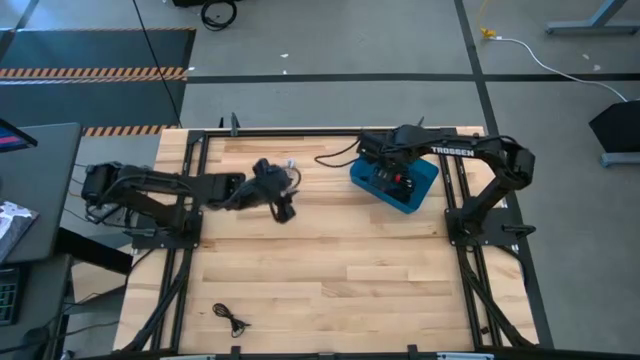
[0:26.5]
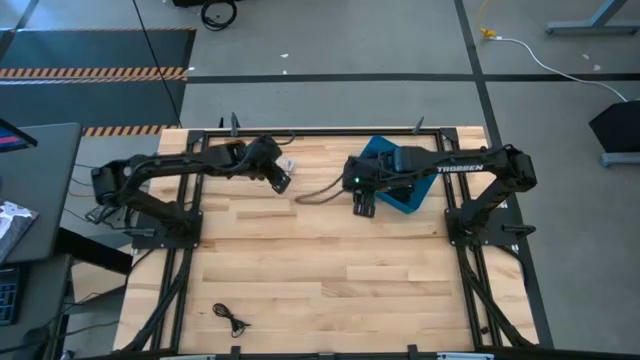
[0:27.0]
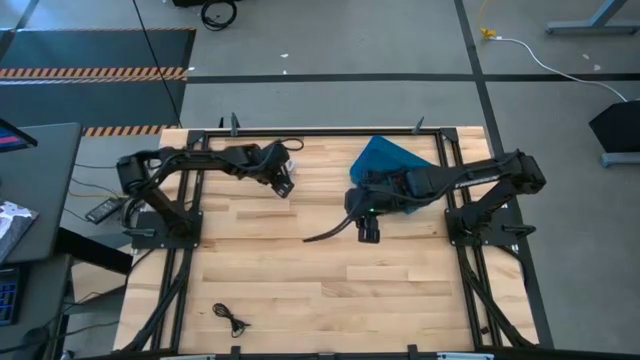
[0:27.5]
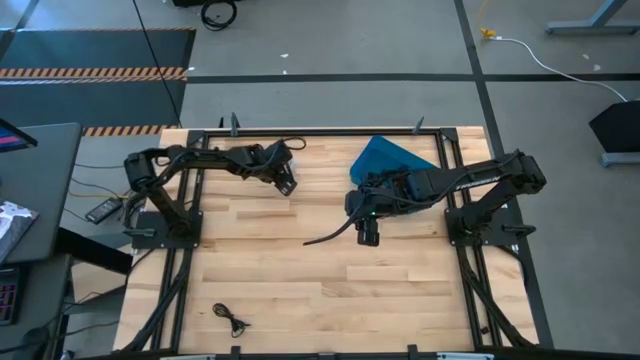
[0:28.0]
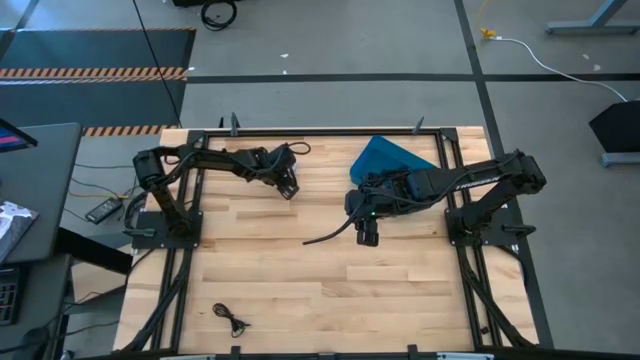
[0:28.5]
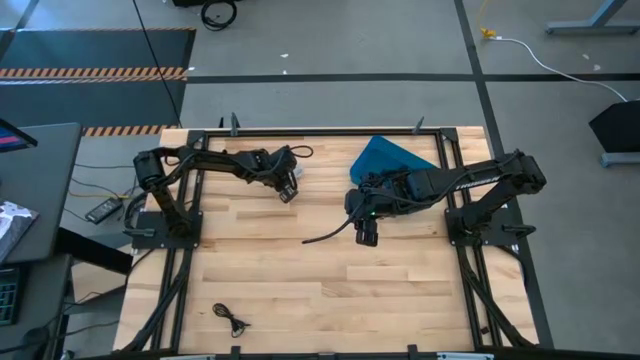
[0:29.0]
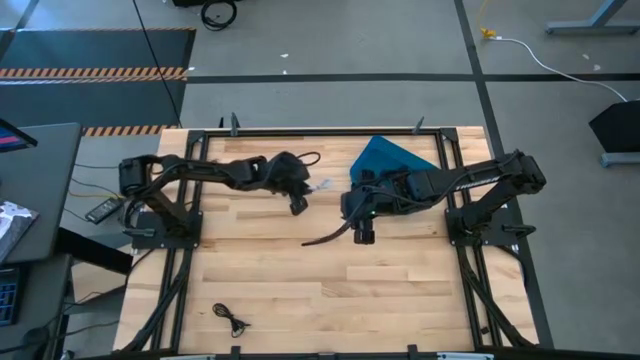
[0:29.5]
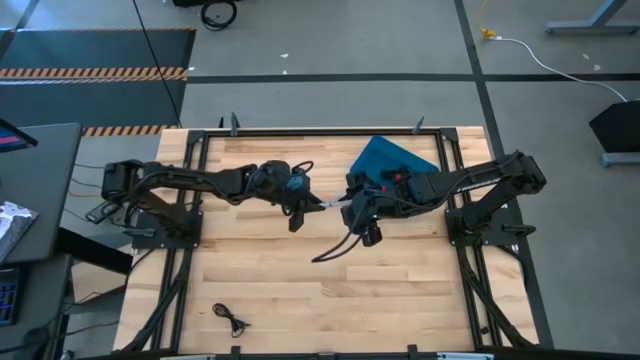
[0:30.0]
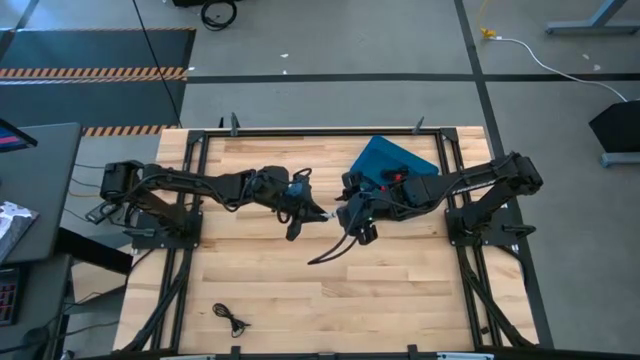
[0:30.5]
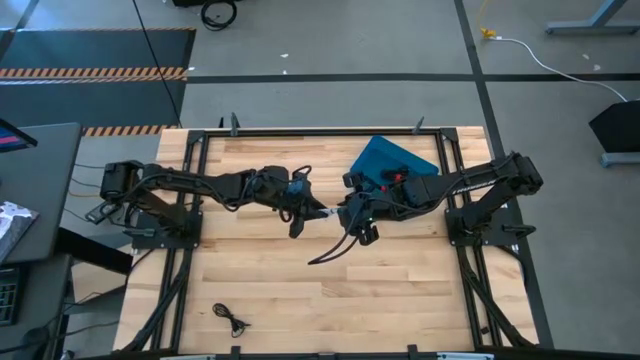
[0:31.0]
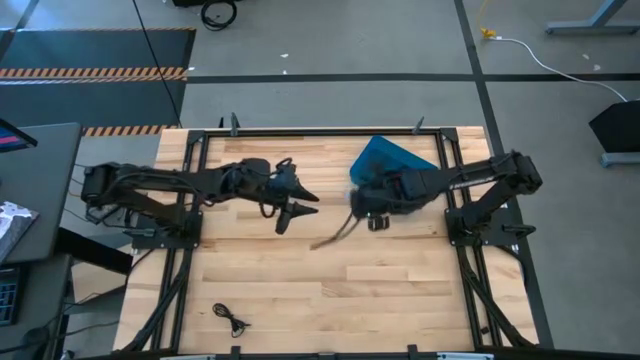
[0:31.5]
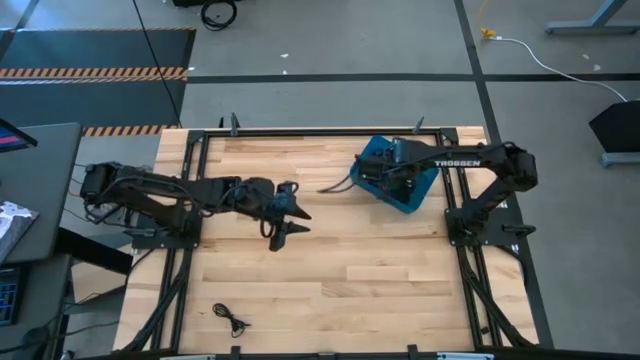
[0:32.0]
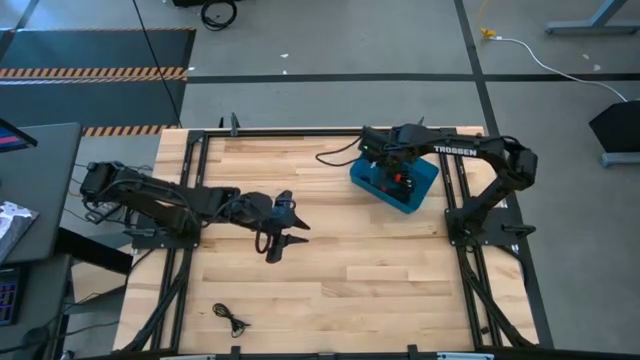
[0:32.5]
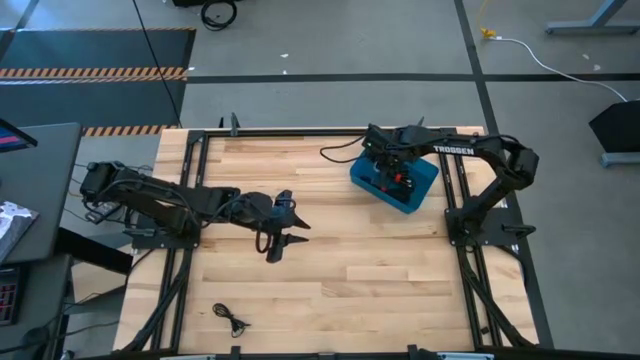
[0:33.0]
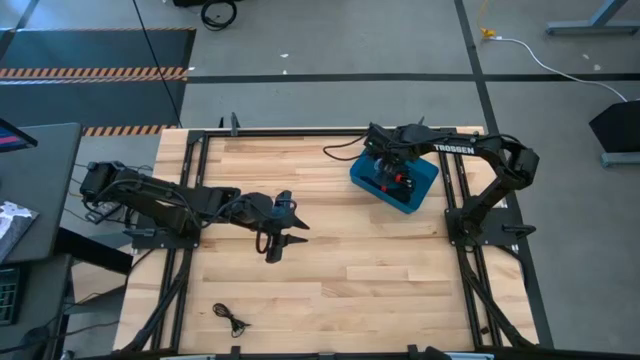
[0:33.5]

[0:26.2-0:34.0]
Task: Pick and place USB-C Cables
Put the white USB cable into the blue bin

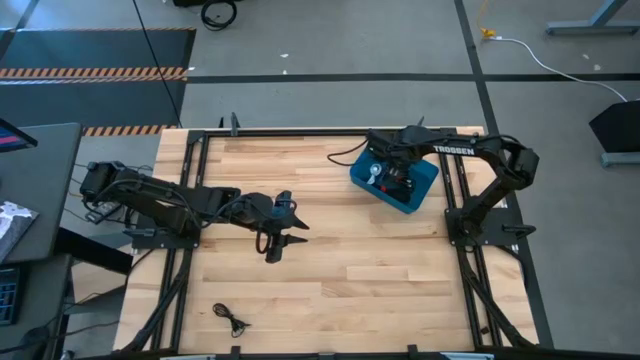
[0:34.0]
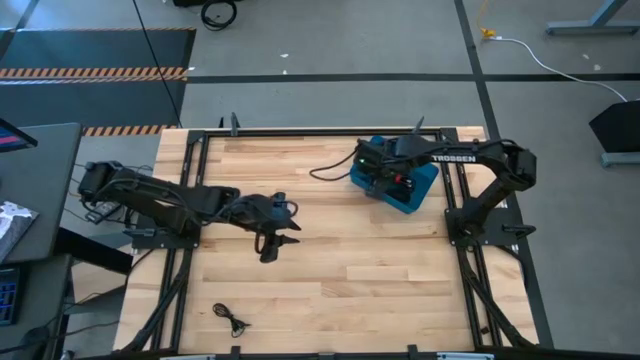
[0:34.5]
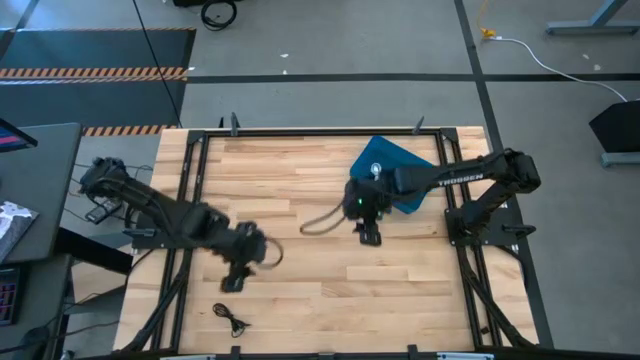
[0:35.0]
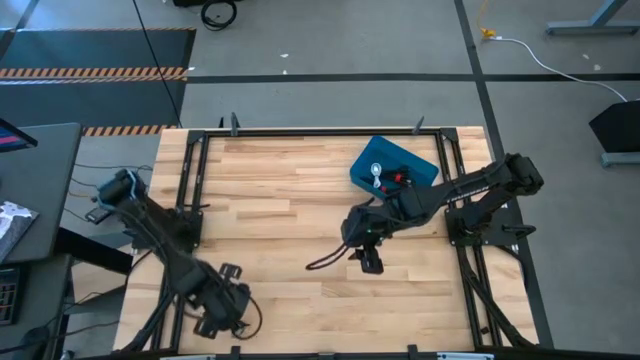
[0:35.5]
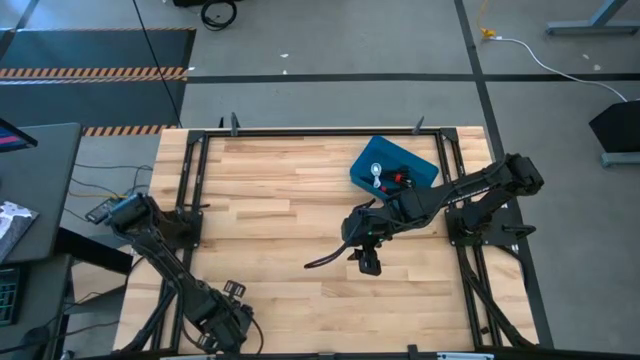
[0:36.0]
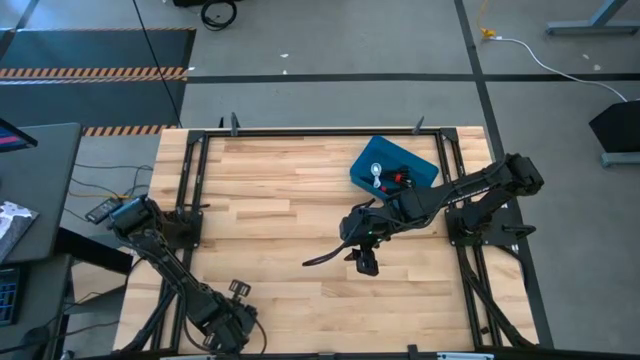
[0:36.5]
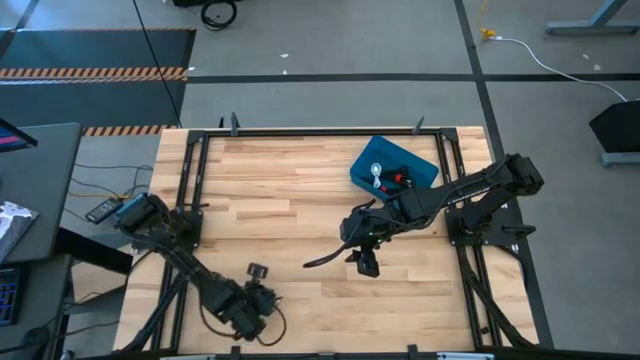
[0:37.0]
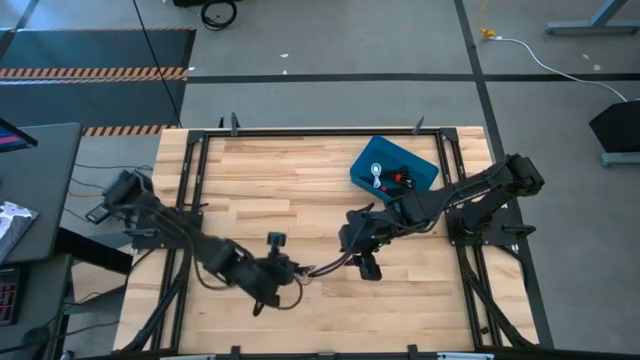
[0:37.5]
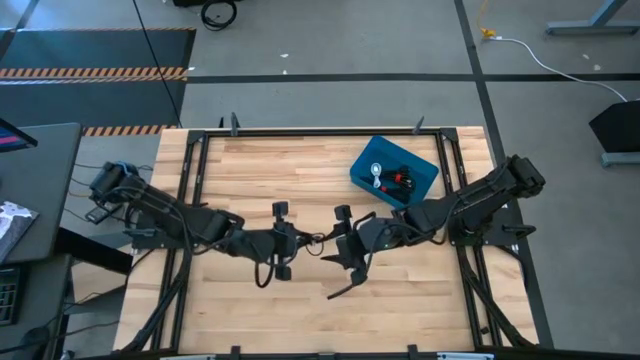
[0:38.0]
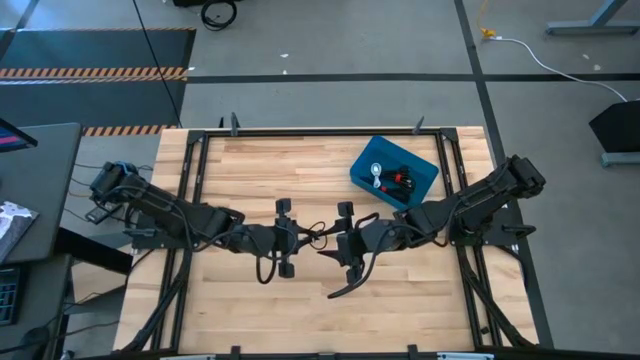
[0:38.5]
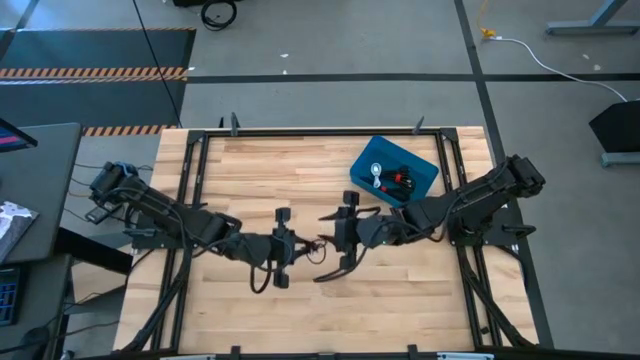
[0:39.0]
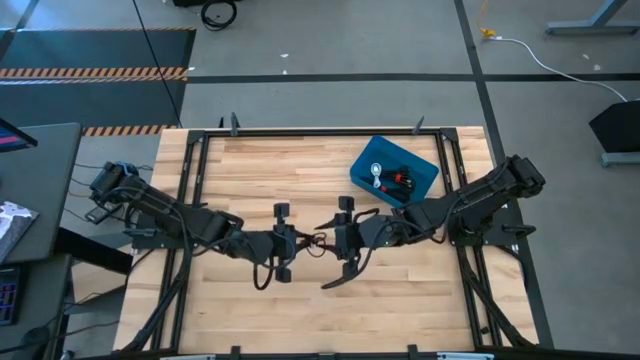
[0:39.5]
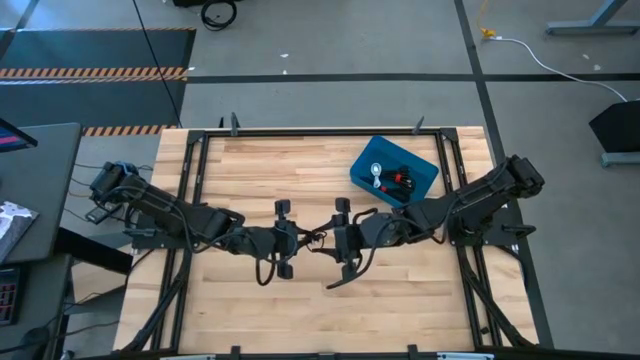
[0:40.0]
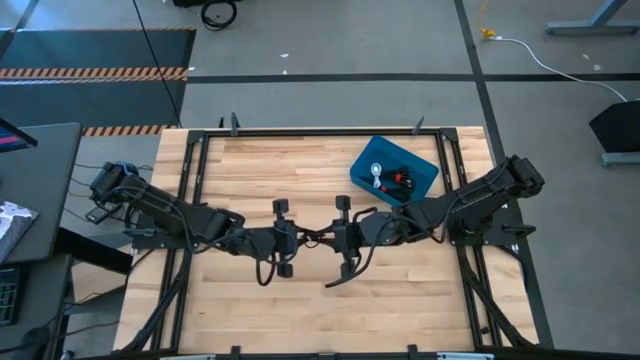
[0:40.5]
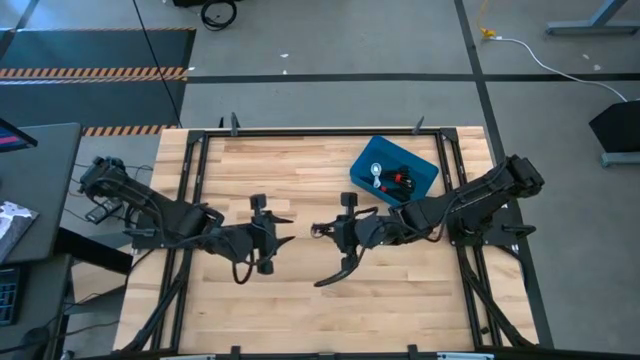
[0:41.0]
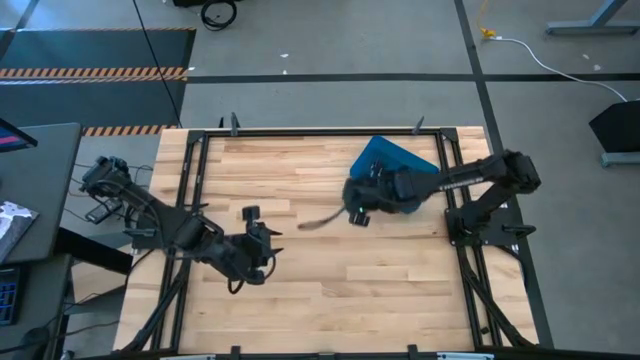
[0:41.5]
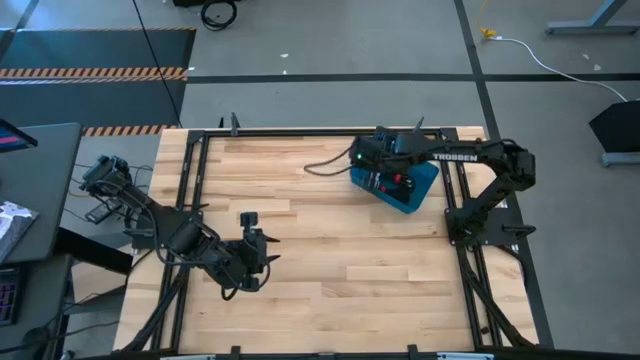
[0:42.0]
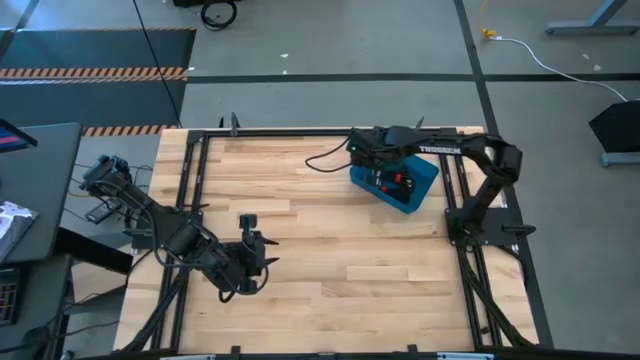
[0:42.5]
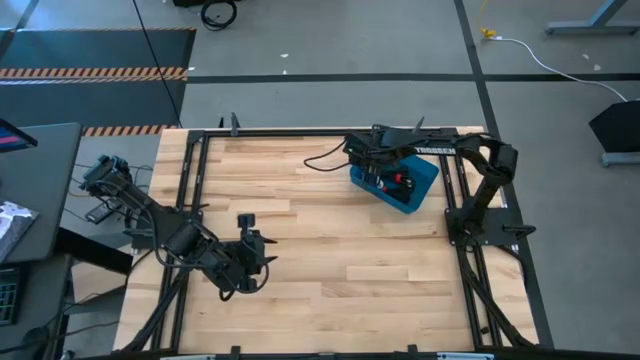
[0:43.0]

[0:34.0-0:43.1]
Put the black USB cable into the blue bin

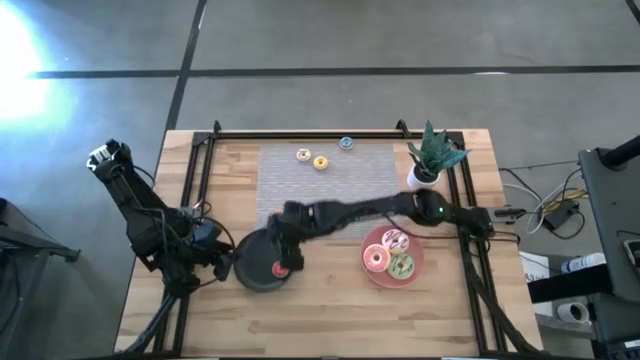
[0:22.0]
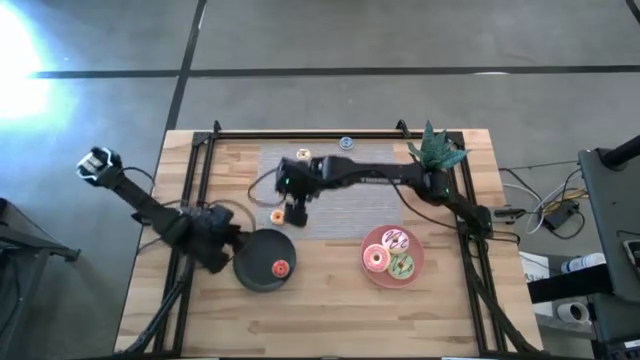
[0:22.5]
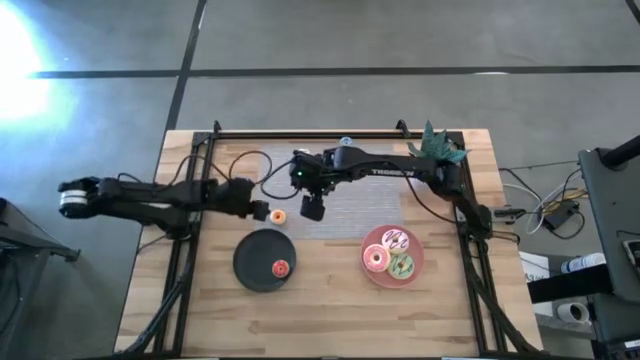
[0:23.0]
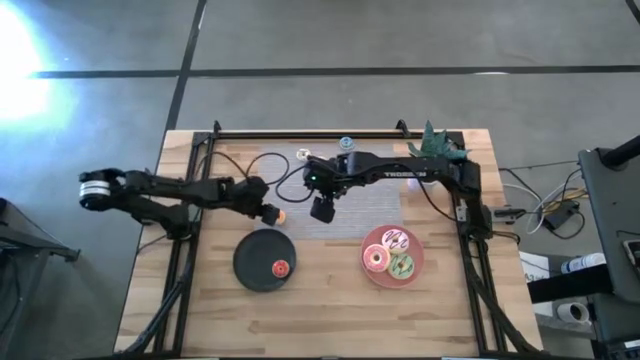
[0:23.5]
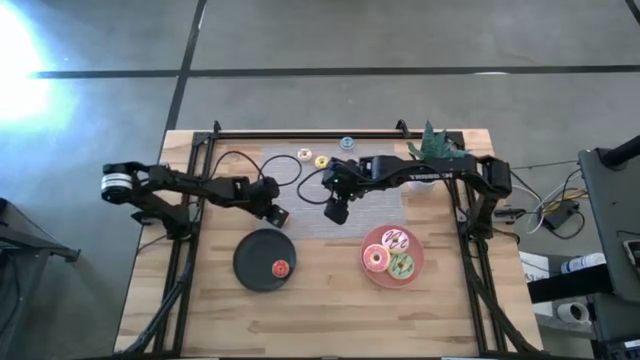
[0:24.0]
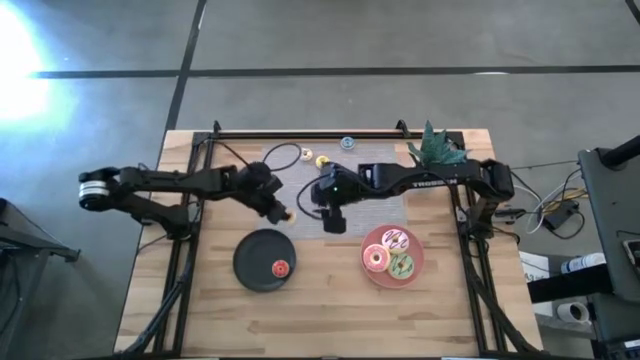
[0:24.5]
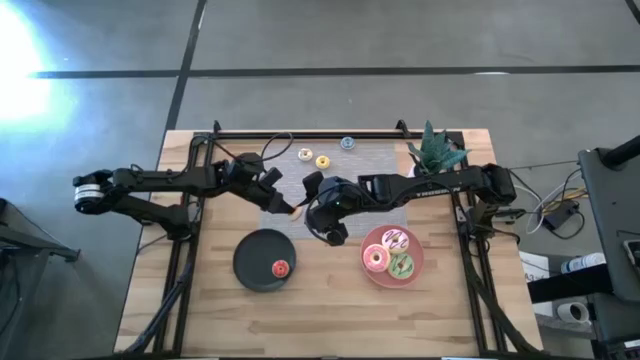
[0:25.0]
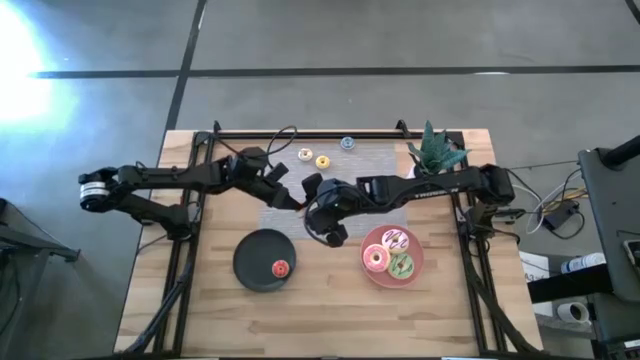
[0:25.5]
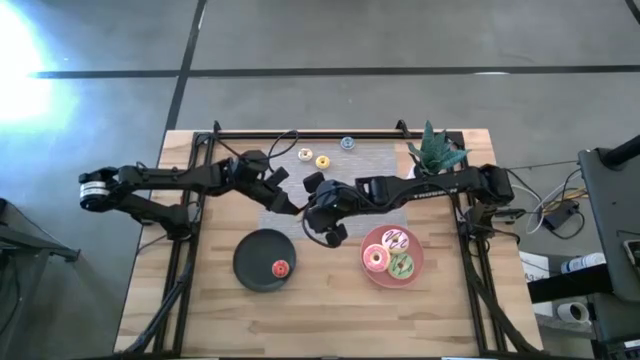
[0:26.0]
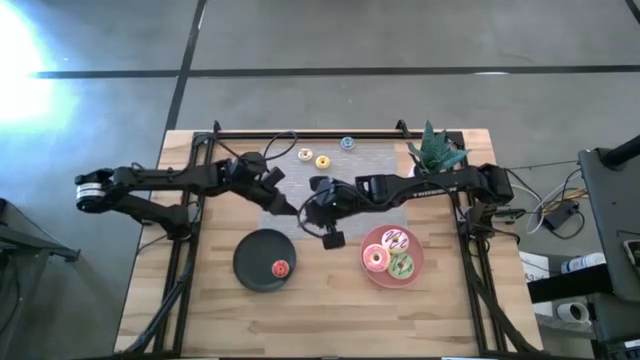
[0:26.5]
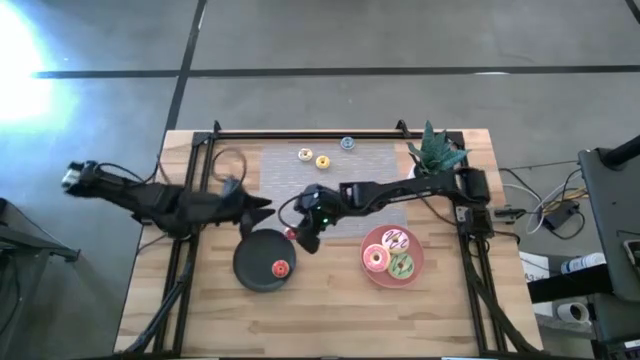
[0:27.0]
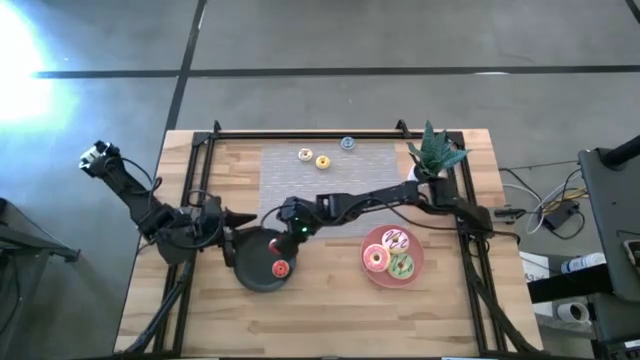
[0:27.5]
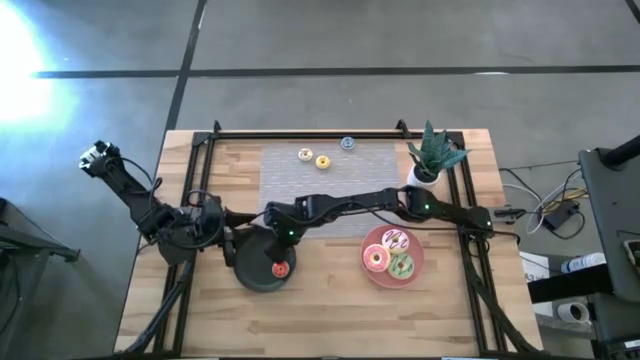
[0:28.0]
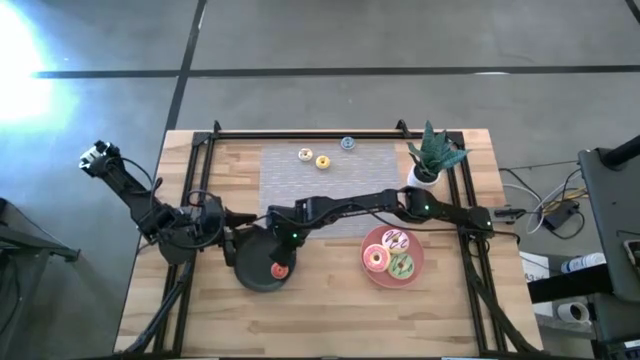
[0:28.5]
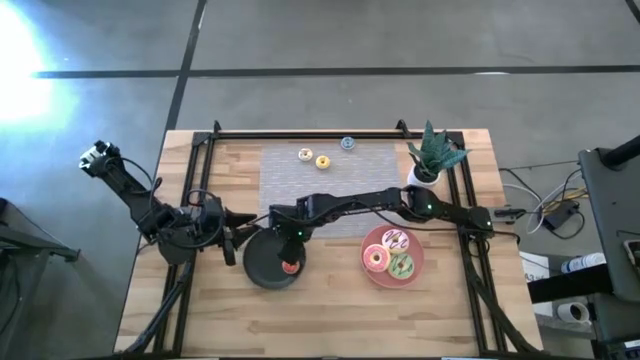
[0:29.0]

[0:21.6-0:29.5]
Task: Pick & Place donuts
Put the small pink donut on the black plate
